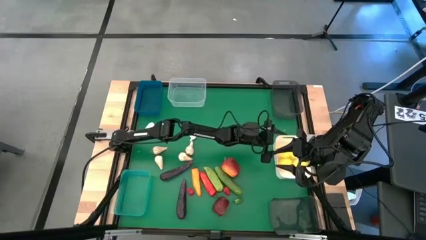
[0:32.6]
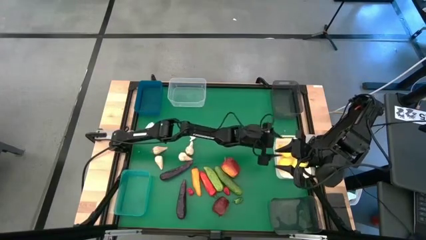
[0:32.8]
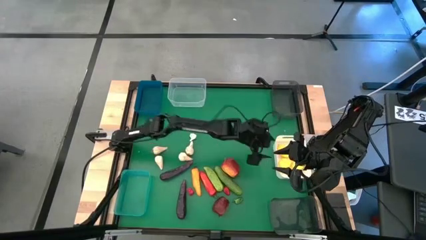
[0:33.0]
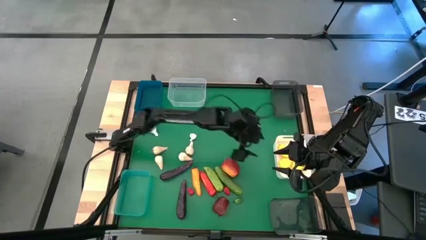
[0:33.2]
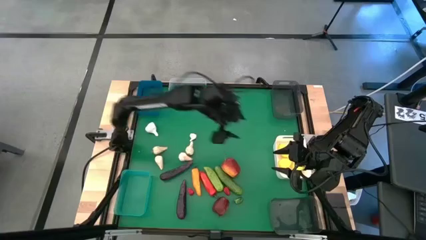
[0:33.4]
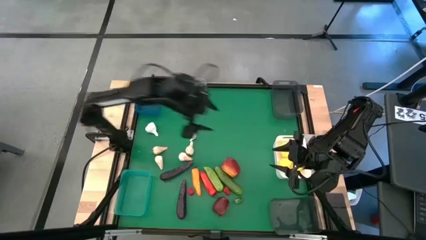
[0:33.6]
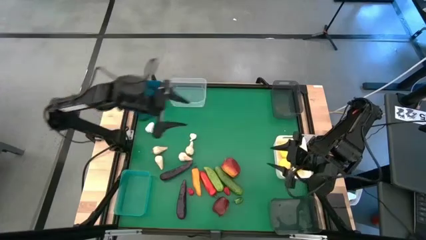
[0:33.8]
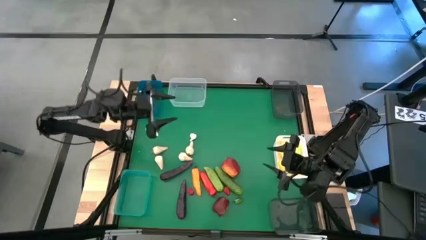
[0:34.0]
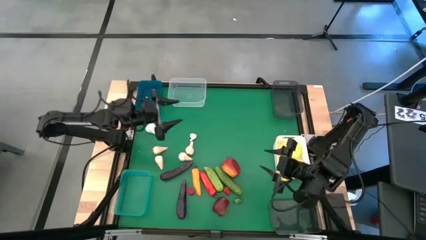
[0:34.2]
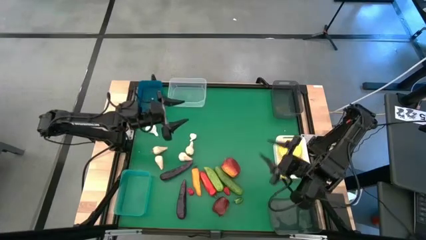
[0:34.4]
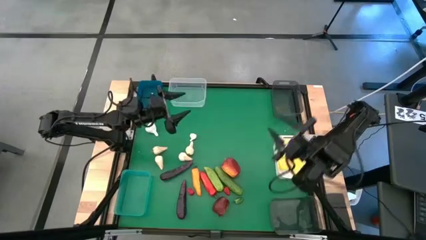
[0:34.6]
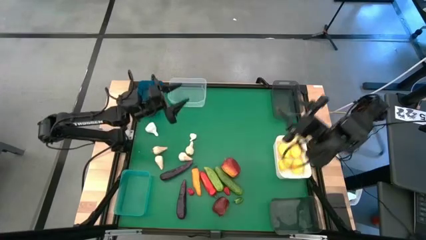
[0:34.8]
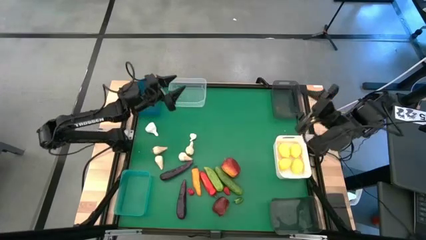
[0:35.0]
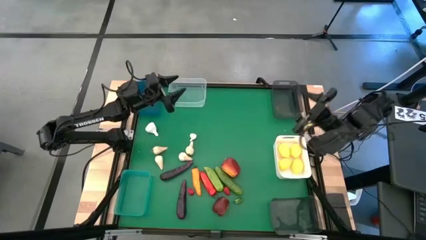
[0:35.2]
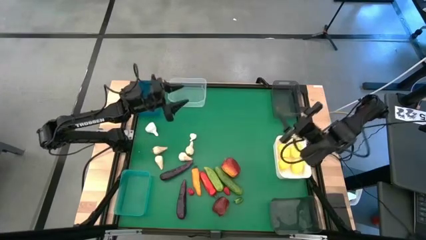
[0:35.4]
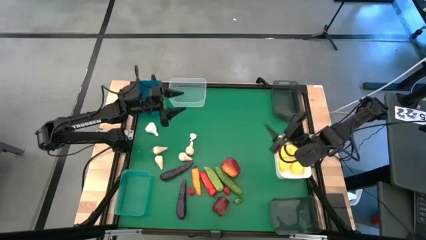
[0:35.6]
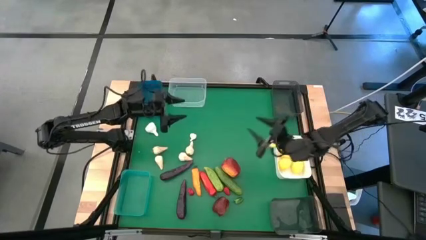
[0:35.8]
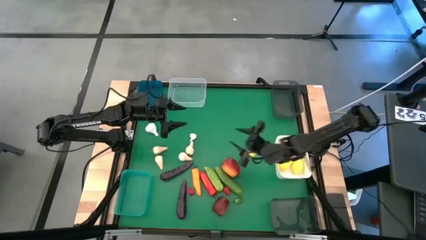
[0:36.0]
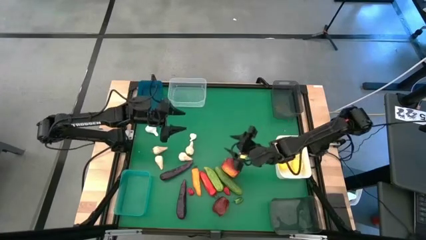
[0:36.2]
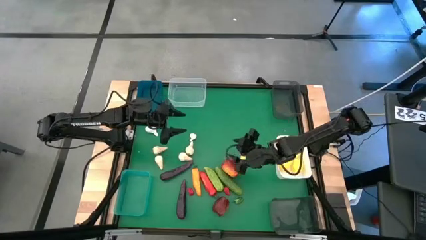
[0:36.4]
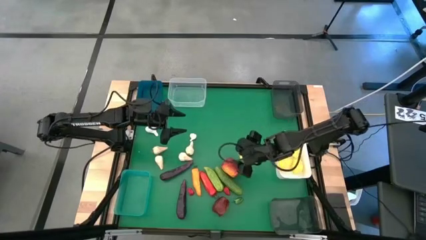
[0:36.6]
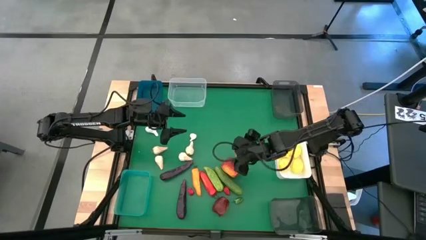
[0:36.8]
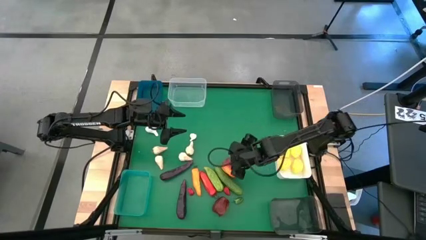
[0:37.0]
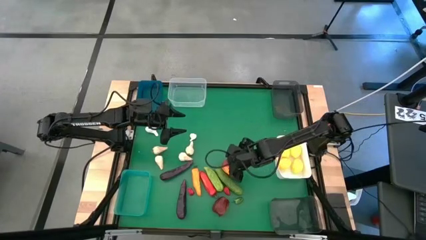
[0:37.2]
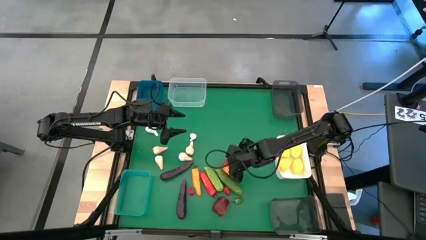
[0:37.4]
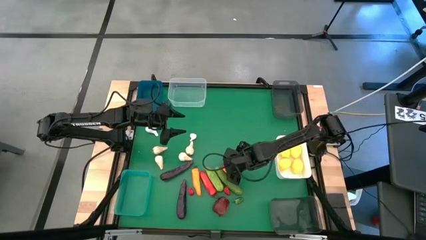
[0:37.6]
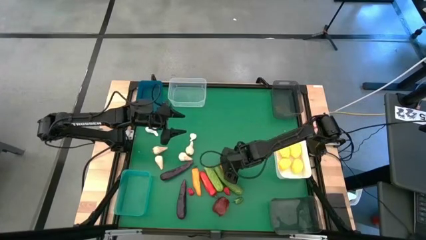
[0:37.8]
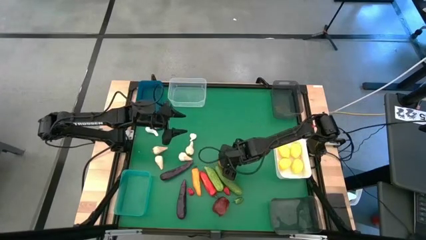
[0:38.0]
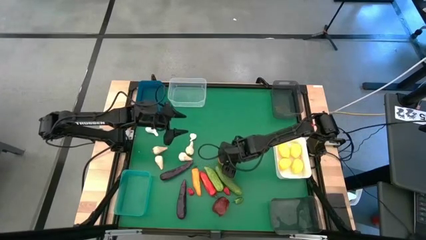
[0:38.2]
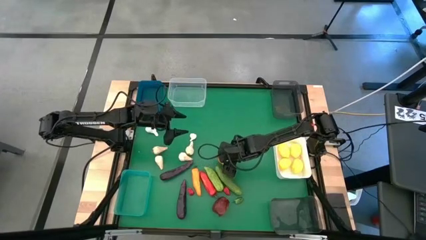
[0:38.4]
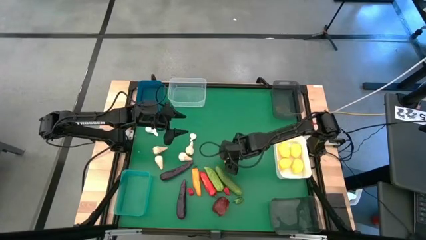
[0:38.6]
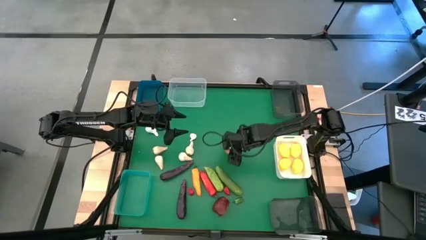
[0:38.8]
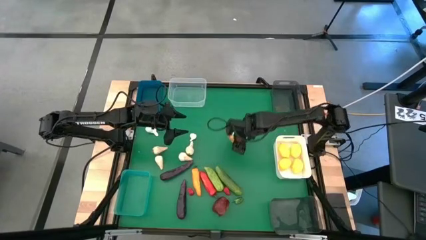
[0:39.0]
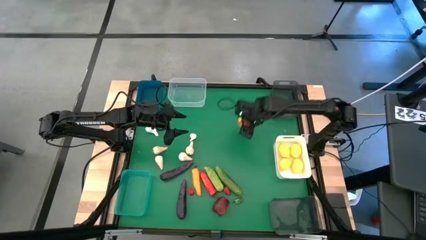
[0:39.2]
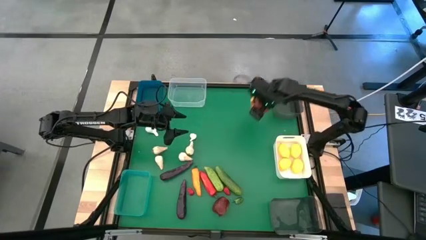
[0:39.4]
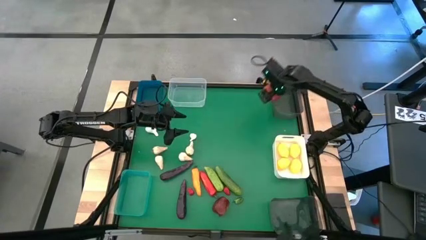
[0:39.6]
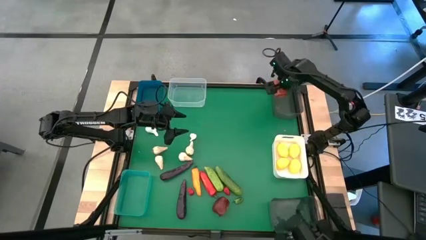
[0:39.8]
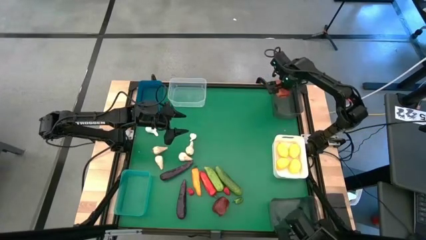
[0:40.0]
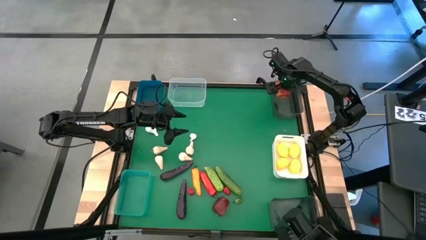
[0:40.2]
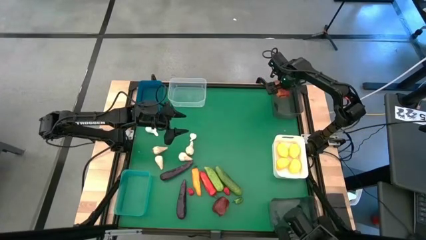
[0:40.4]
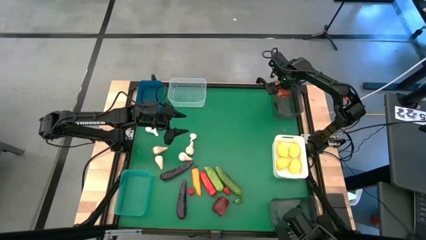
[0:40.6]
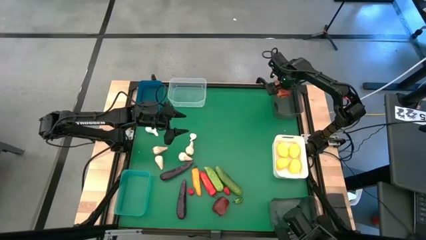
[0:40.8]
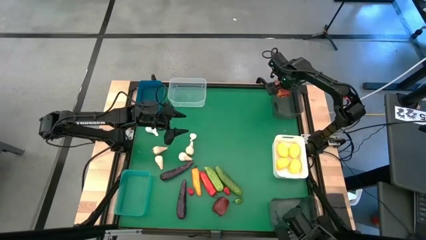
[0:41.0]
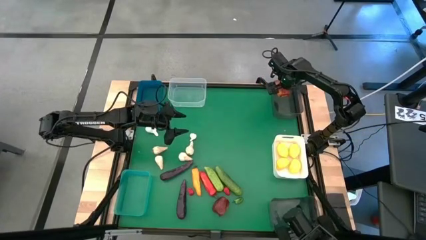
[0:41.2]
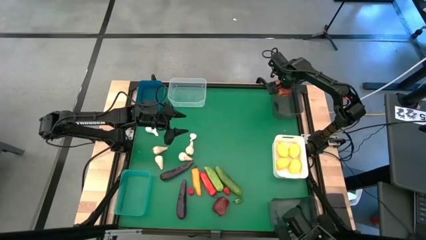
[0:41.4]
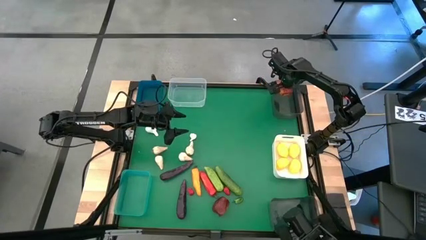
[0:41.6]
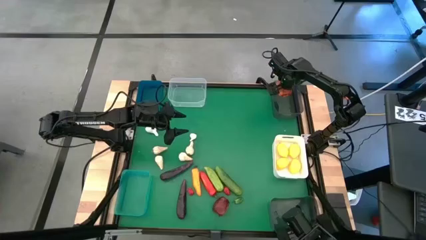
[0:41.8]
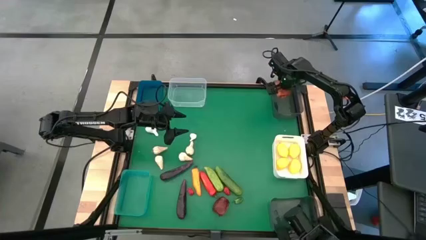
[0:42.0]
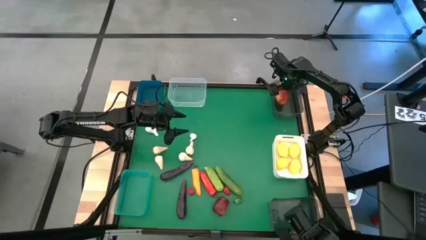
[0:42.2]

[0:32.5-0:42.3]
Task: Sort produce into baskets
Put the red apple into the top black bin

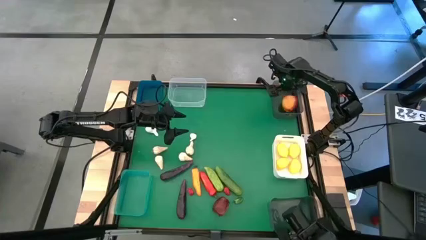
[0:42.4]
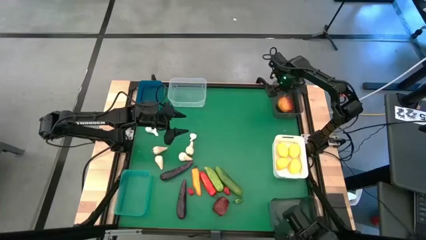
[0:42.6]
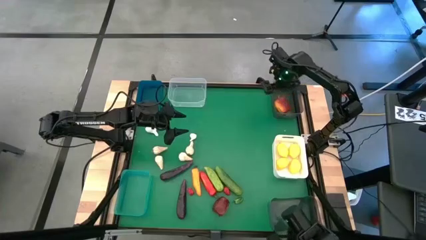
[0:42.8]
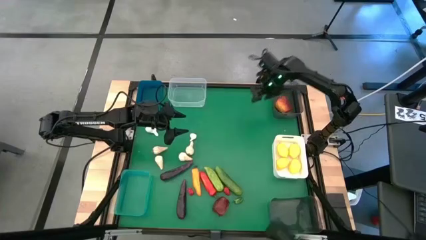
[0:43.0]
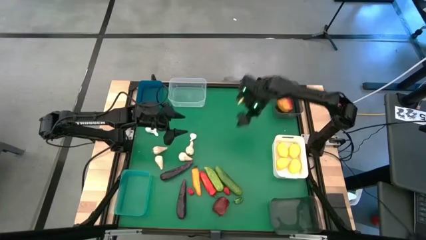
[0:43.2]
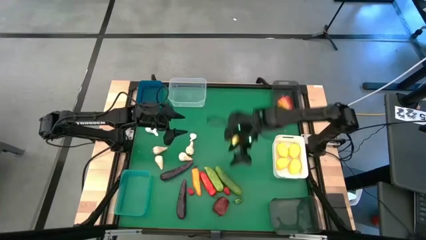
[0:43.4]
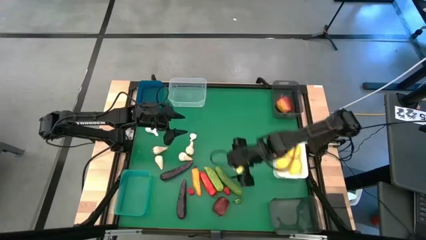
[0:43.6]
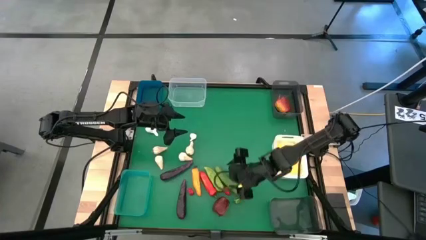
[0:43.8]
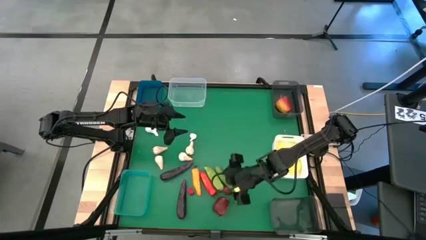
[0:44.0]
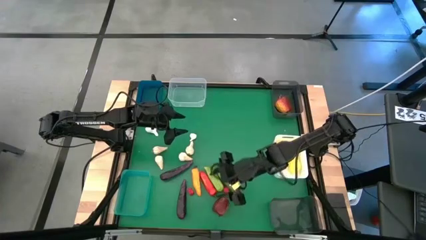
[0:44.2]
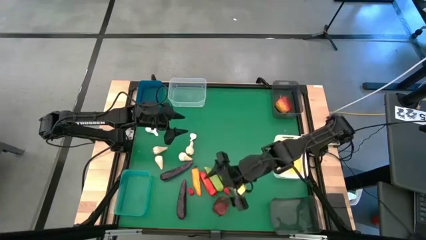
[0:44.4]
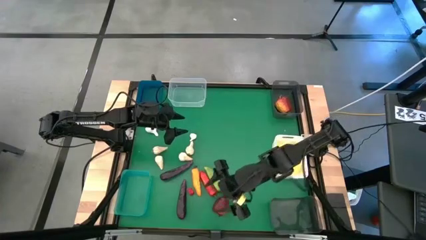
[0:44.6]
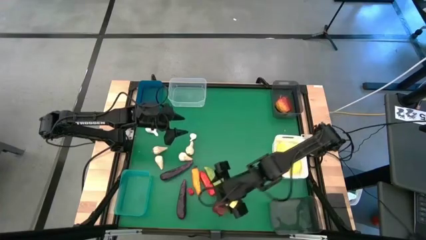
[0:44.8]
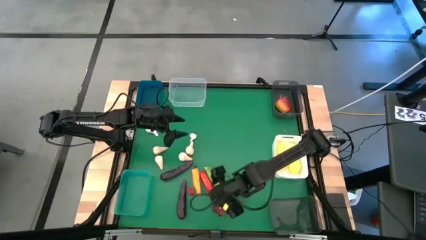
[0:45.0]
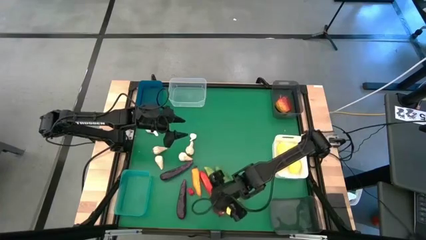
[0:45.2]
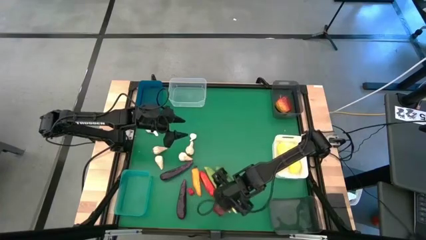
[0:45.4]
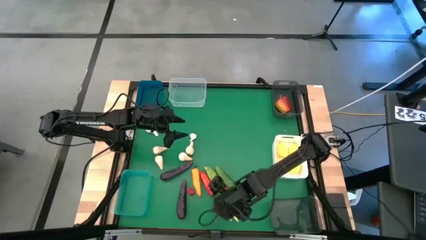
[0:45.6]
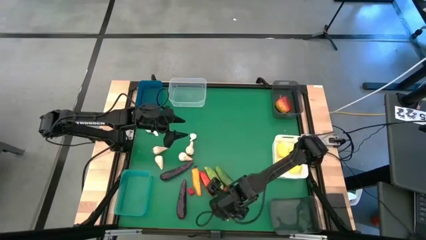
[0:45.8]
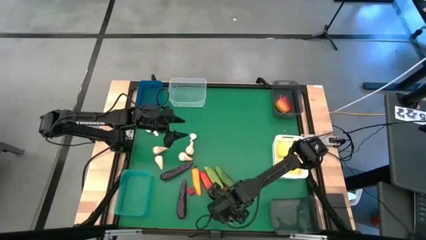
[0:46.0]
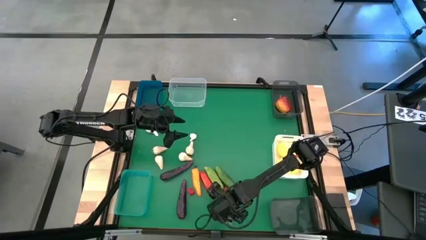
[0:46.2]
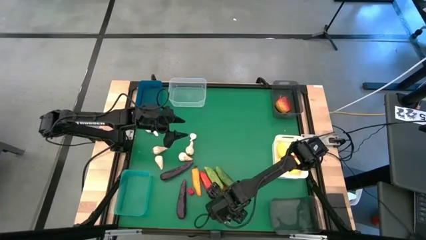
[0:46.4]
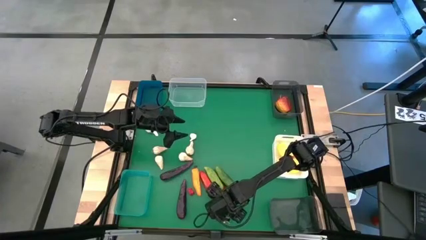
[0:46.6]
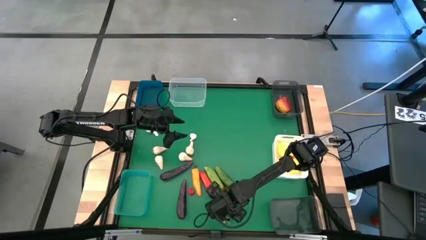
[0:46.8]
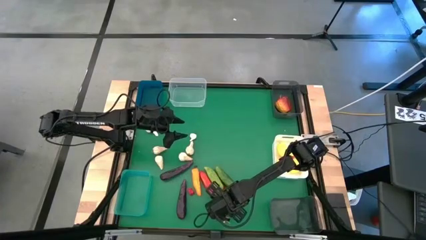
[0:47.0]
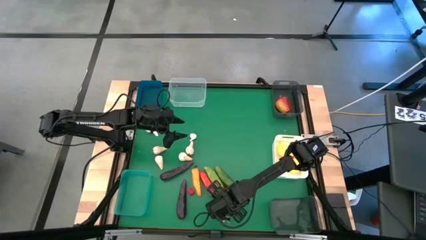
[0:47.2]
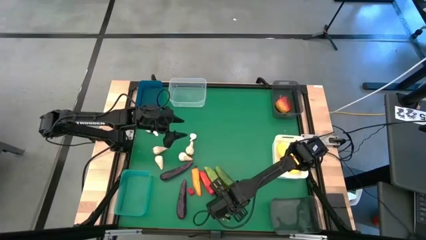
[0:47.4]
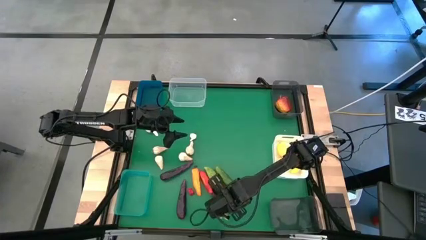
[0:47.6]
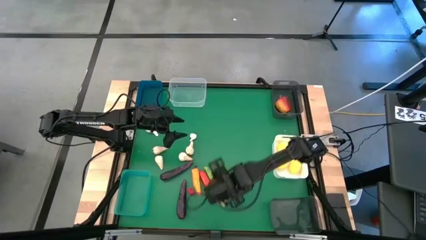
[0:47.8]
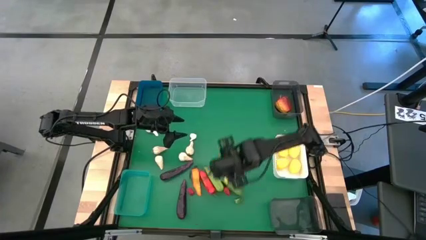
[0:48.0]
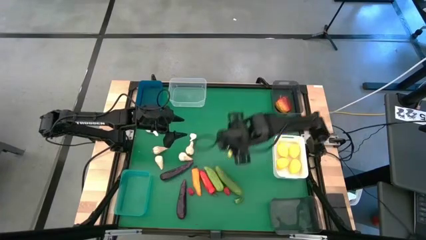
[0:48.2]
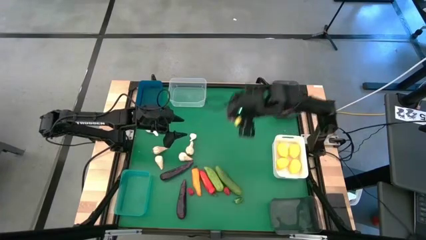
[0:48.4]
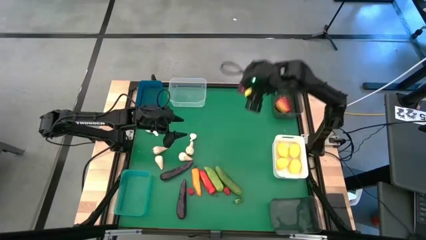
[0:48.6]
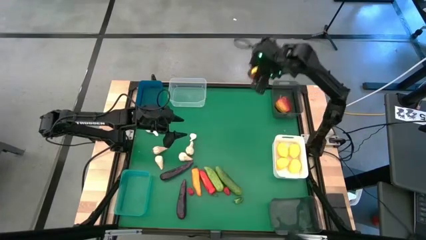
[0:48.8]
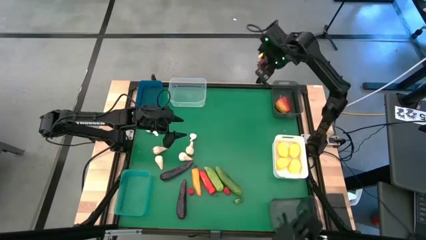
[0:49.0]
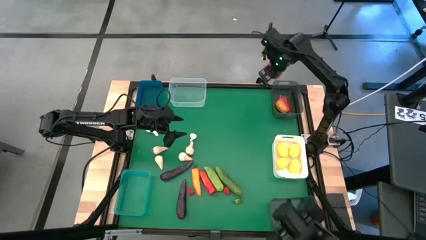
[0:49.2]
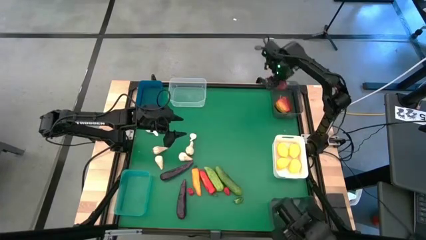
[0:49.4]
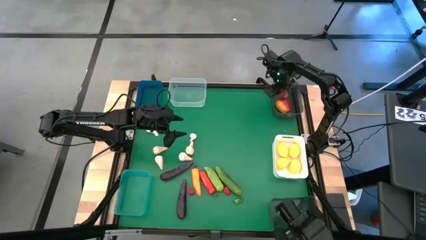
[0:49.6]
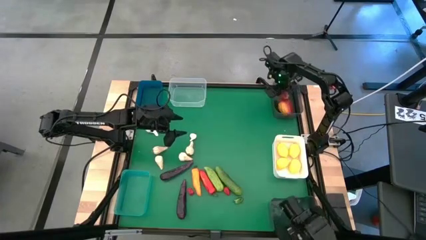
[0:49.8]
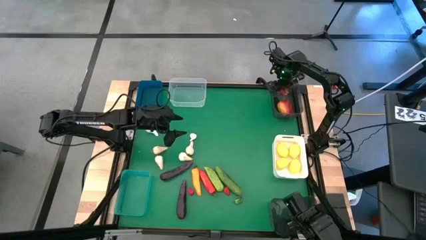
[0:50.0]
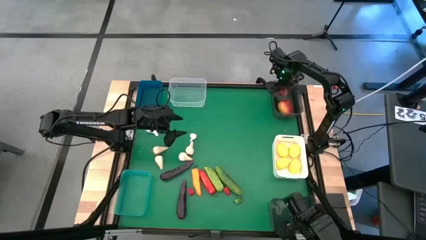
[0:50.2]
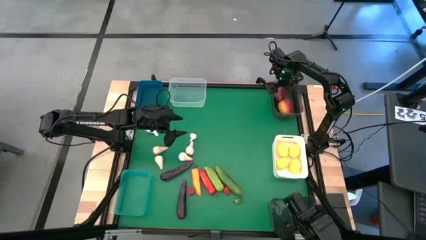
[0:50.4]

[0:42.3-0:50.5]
Put the red apple into the top black bin
